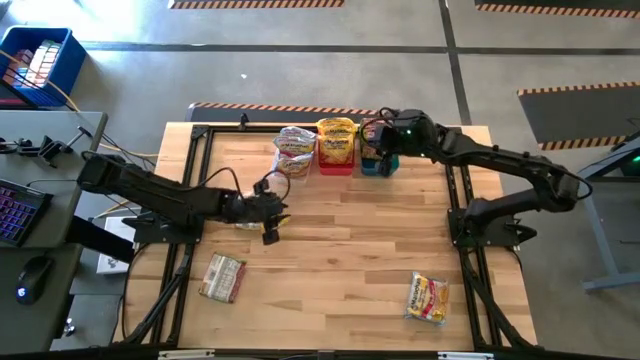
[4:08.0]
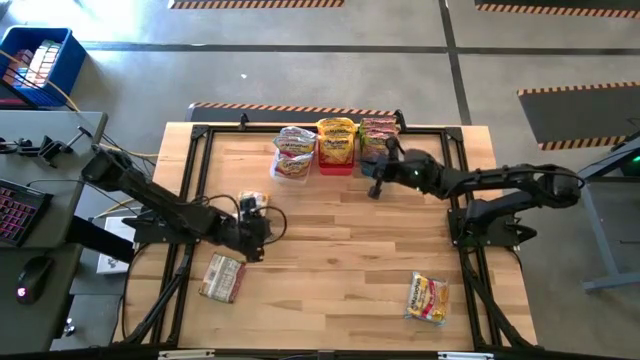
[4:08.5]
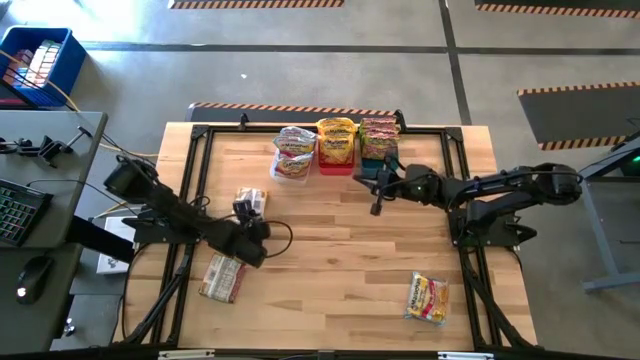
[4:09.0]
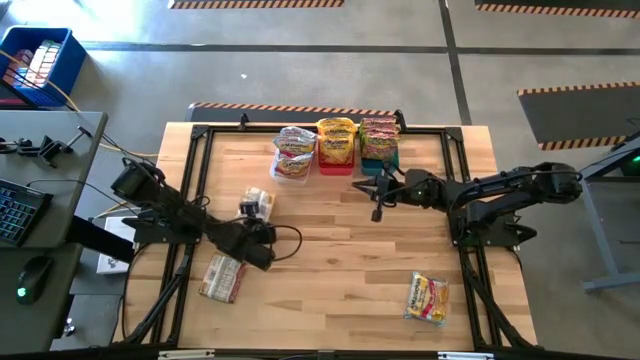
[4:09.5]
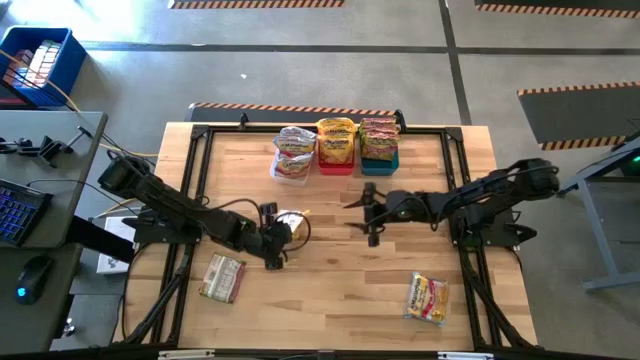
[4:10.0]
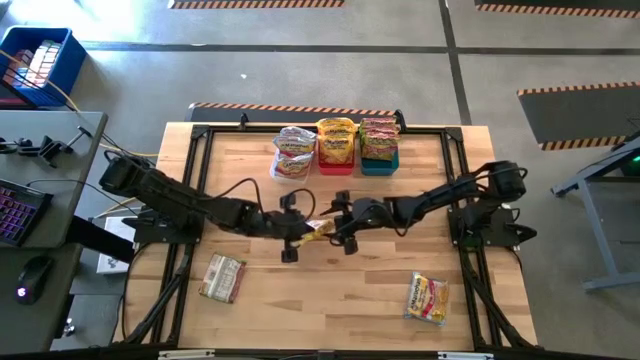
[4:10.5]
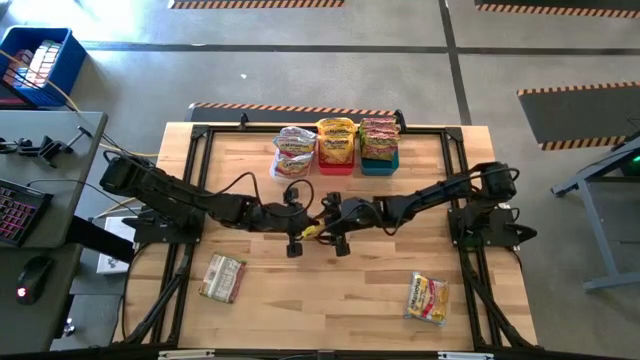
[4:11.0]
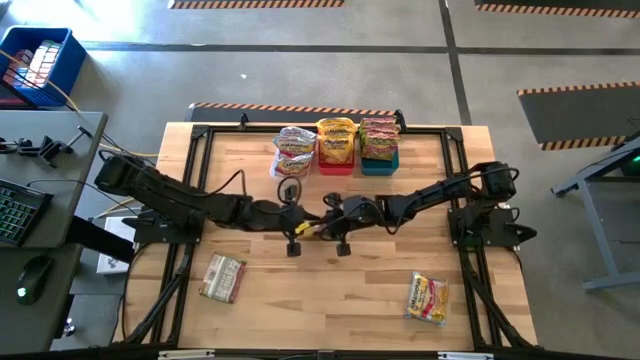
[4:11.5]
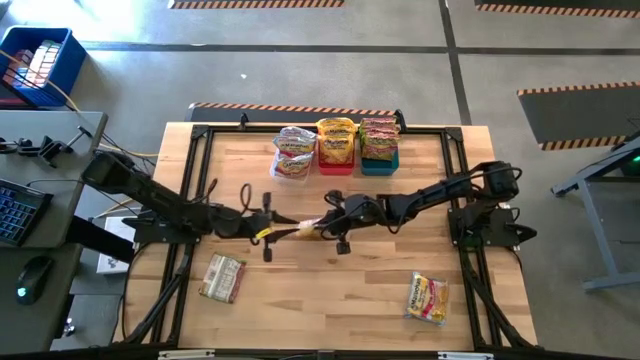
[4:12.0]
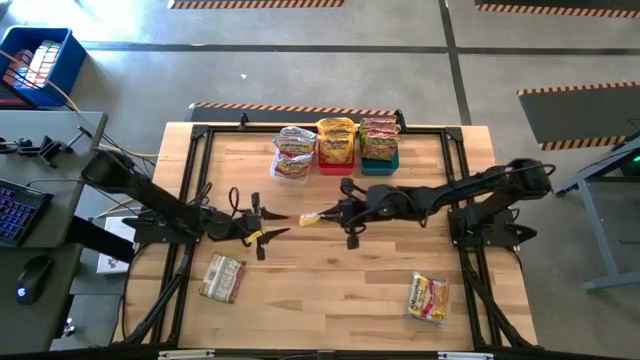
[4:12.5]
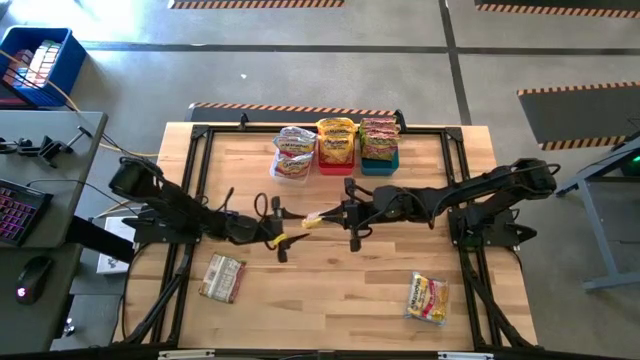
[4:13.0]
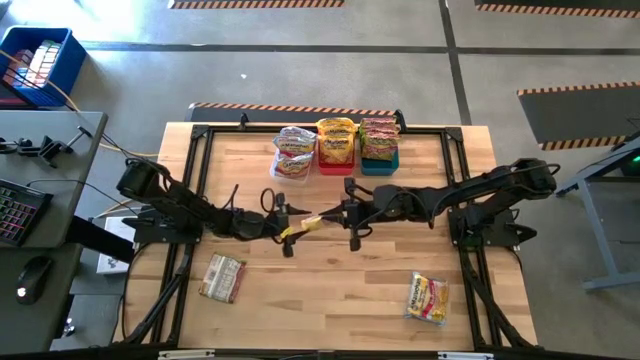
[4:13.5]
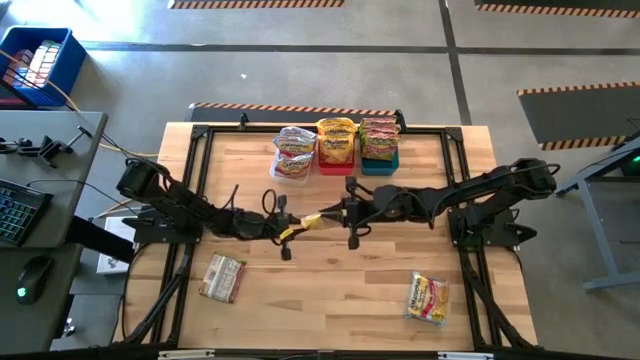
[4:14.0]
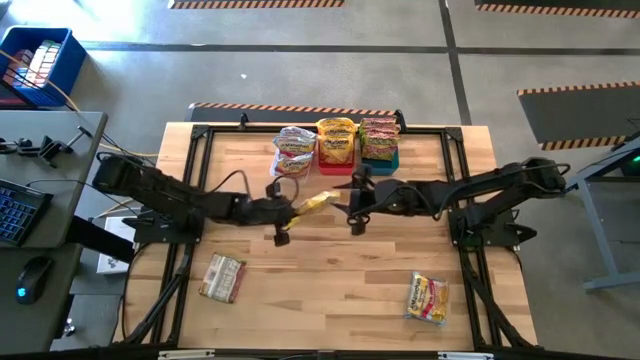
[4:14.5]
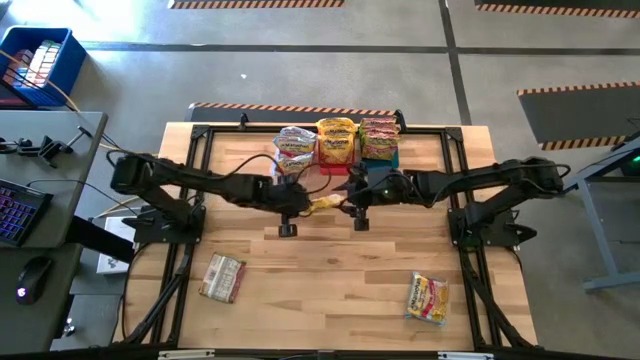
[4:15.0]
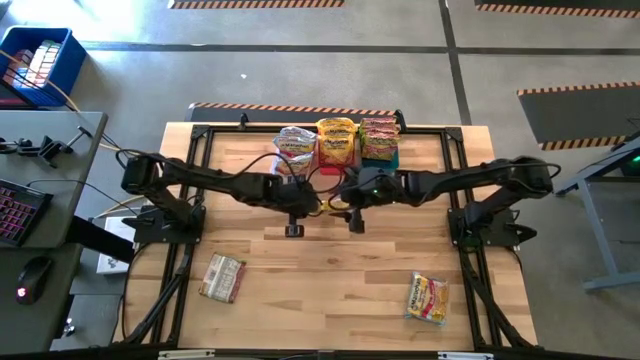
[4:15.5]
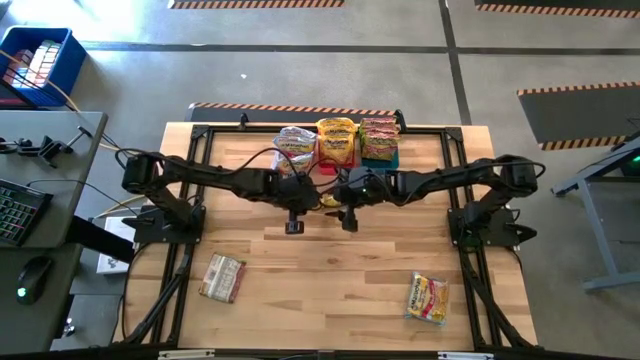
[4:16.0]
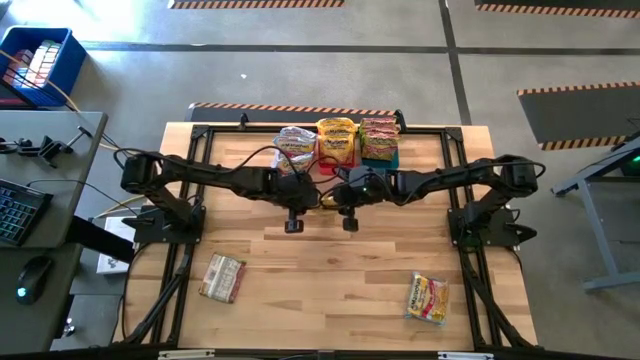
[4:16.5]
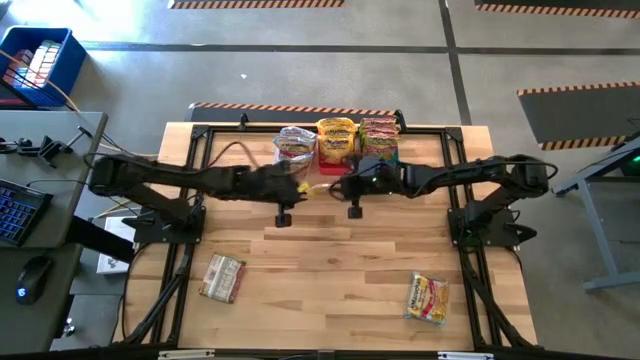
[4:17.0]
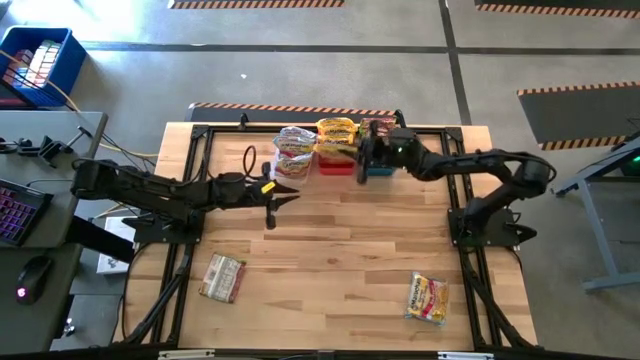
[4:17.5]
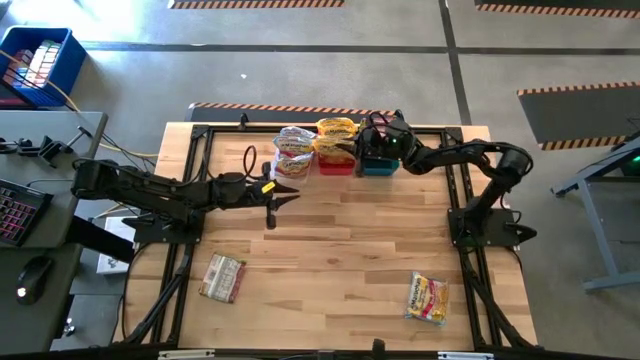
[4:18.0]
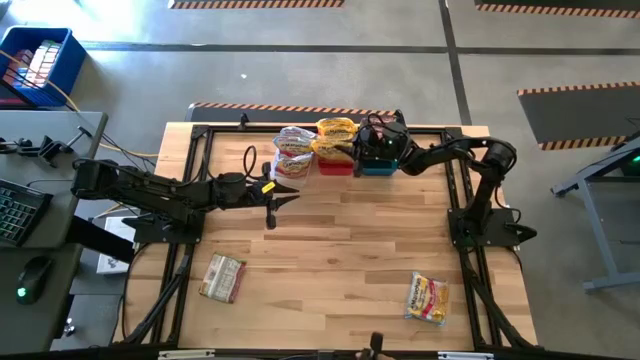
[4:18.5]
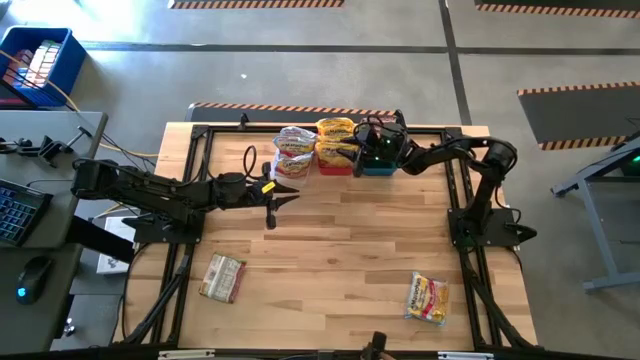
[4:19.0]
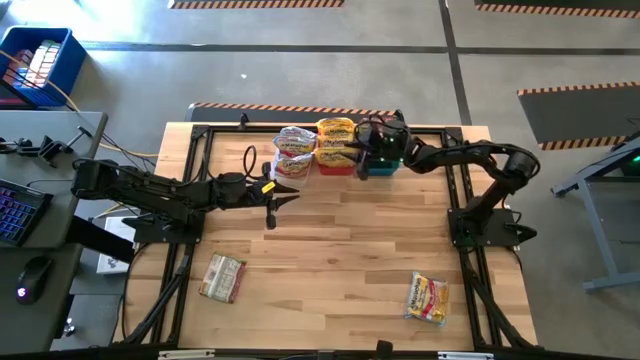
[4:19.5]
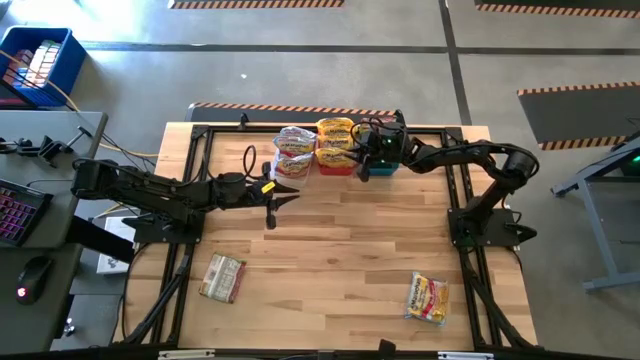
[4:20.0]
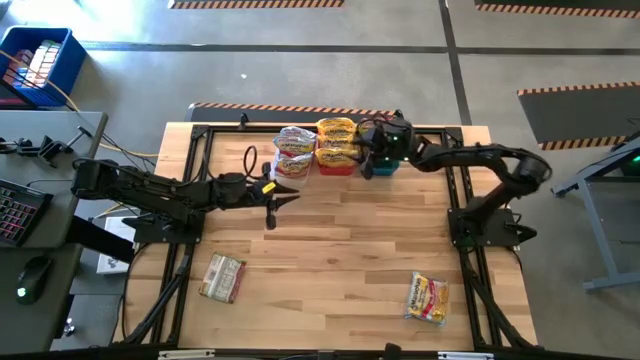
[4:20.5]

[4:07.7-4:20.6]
Task: Sort Maruchan noodles
Put the yellow noodle pack into the red bin

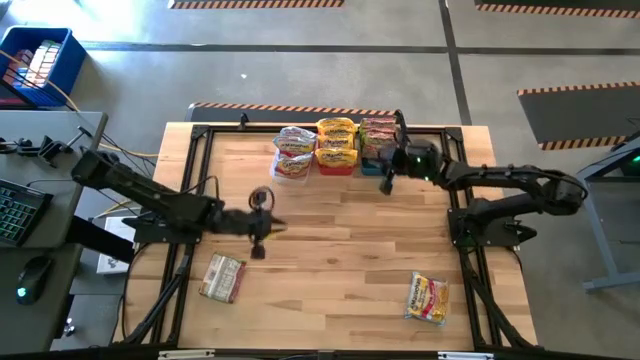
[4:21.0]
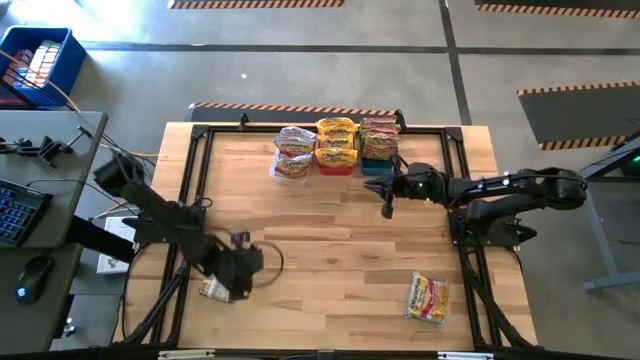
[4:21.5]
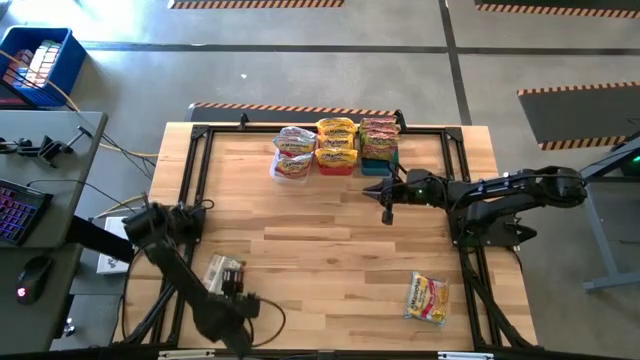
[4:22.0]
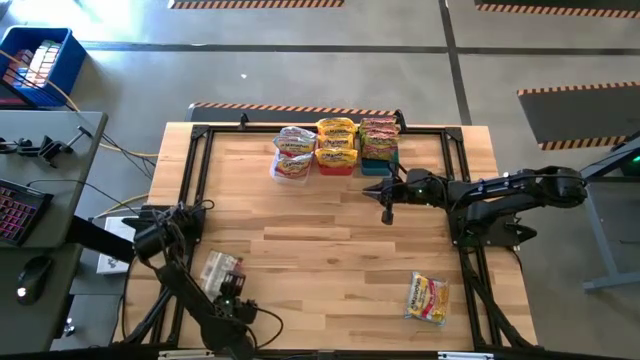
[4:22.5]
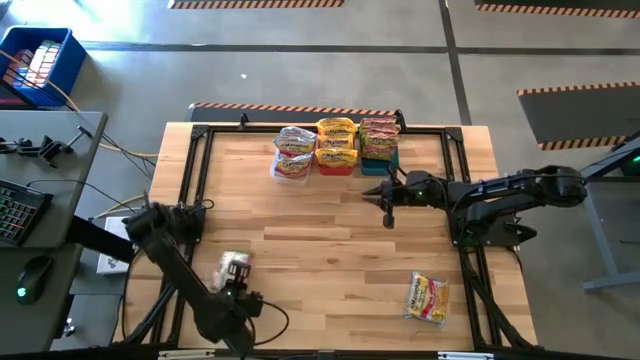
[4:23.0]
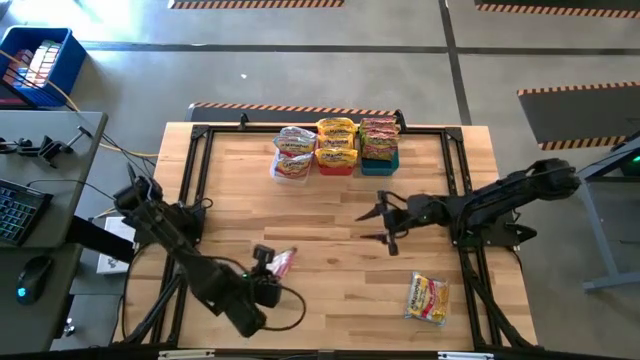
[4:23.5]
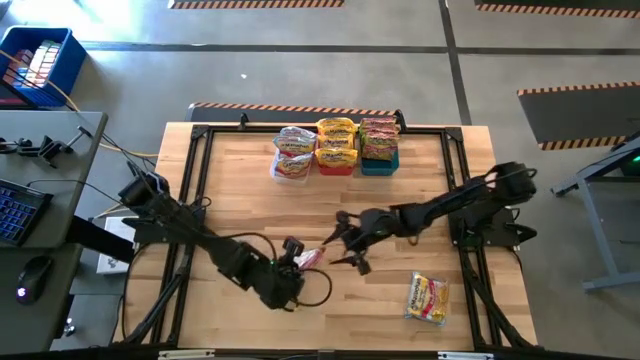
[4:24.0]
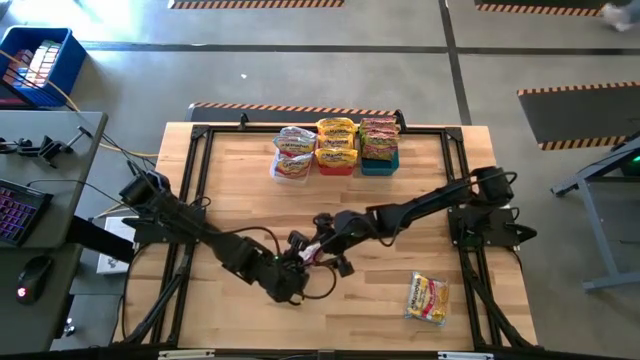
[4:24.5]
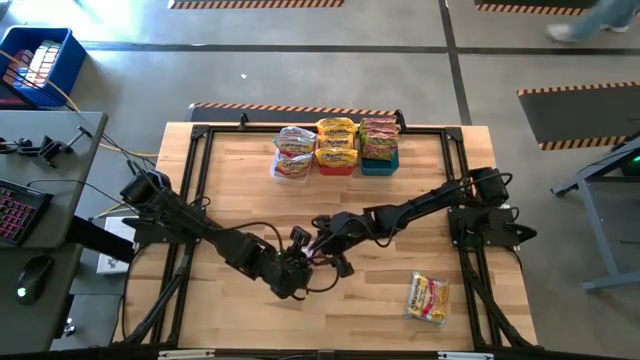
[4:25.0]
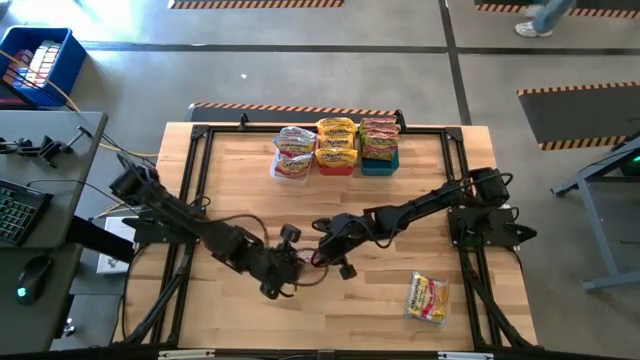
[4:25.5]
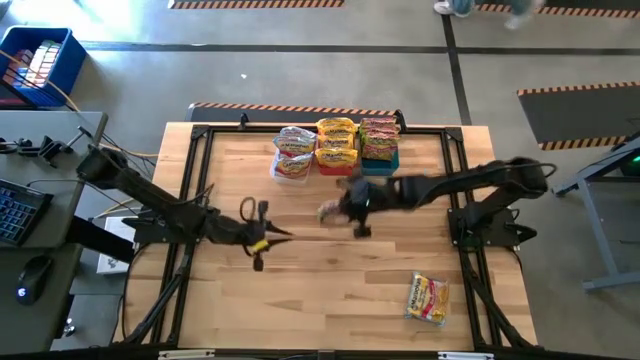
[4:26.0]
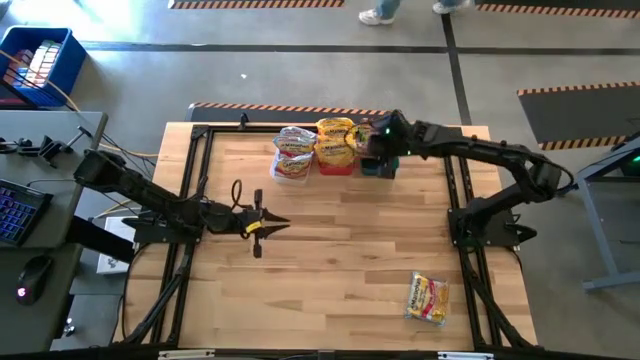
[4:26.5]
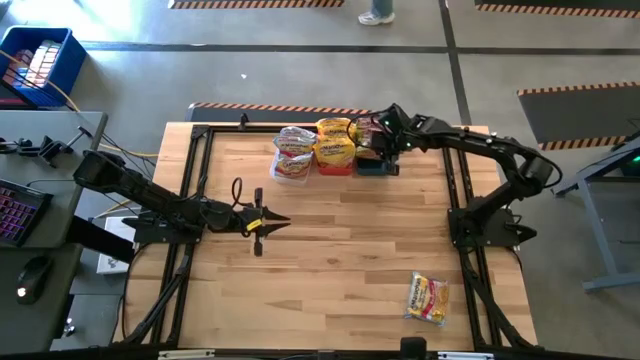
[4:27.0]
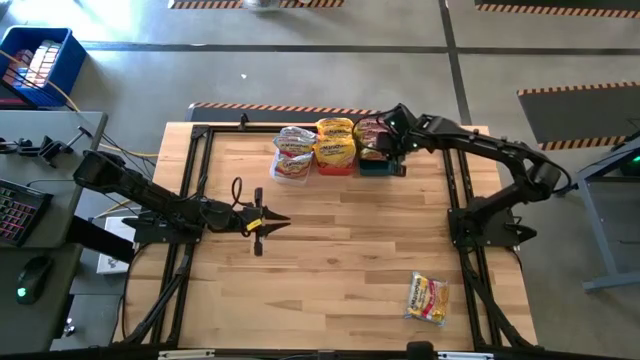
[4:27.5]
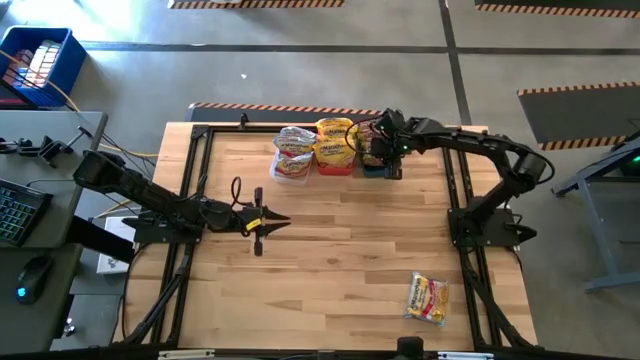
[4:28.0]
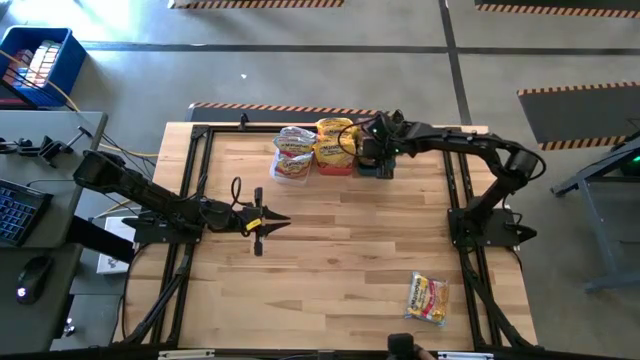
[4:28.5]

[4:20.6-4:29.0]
Put the green noodle pack into the blue bin

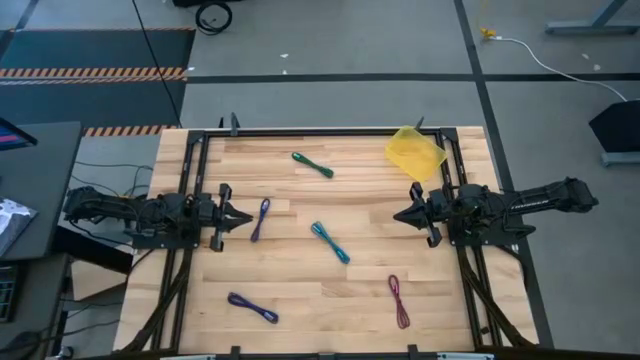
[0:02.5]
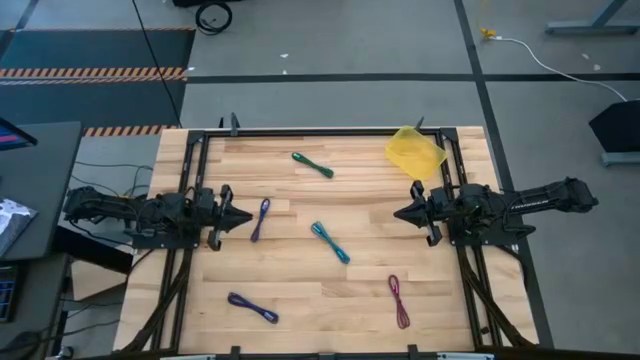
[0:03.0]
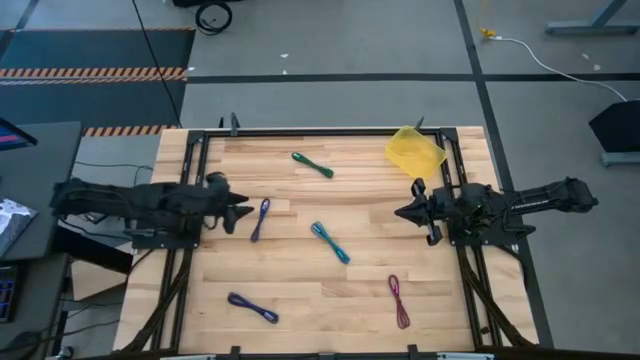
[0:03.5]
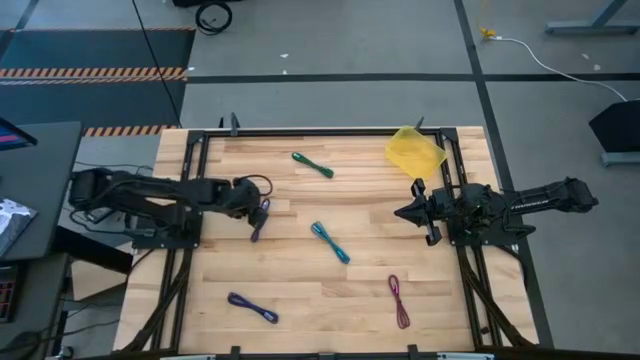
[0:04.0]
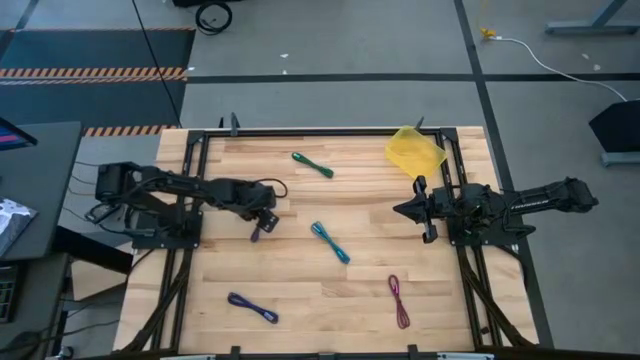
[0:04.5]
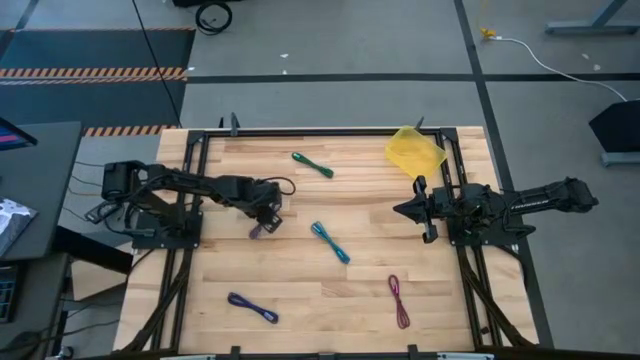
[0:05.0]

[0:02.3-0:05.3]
Task: Pick and place USB-C Cables
Put the violet charger cable into the yellow container
